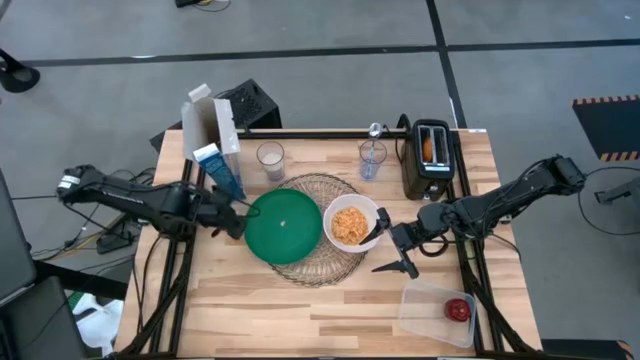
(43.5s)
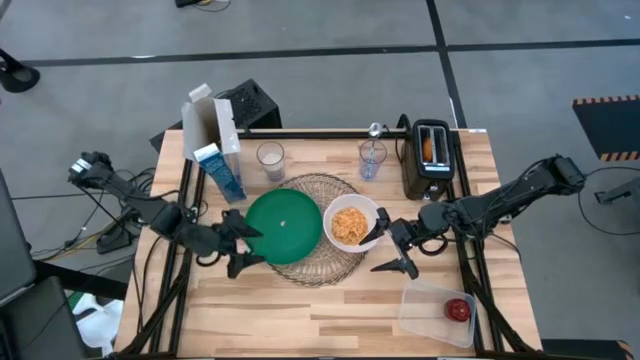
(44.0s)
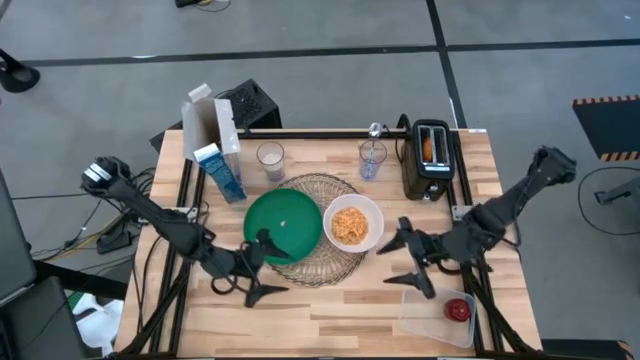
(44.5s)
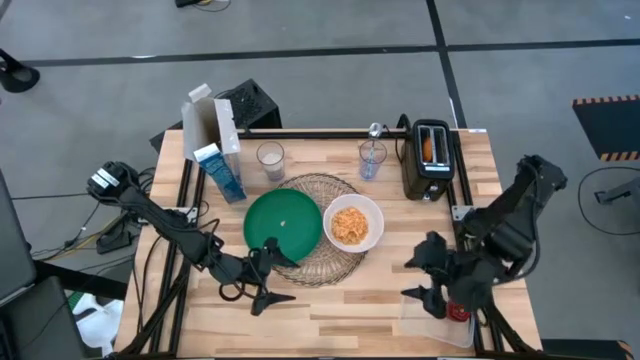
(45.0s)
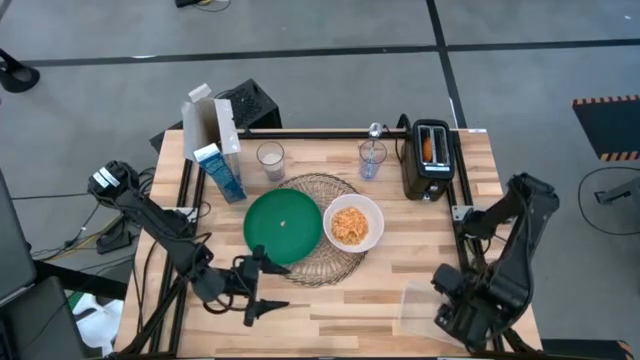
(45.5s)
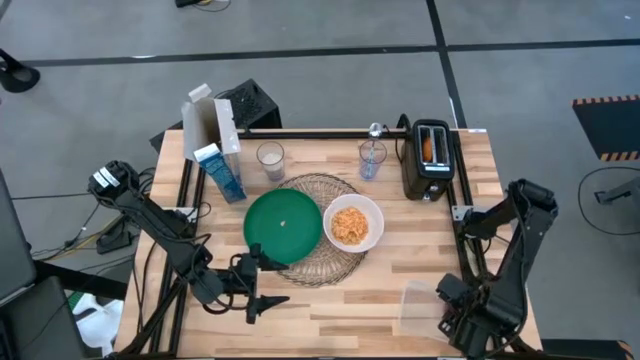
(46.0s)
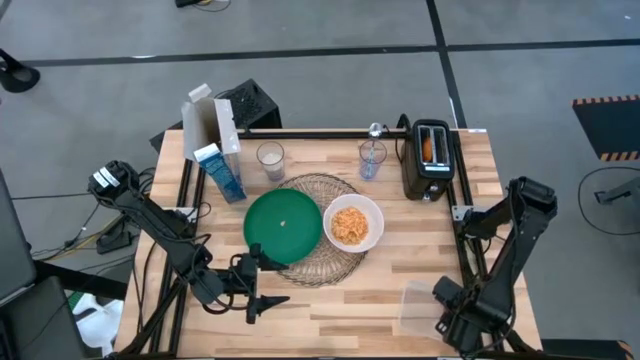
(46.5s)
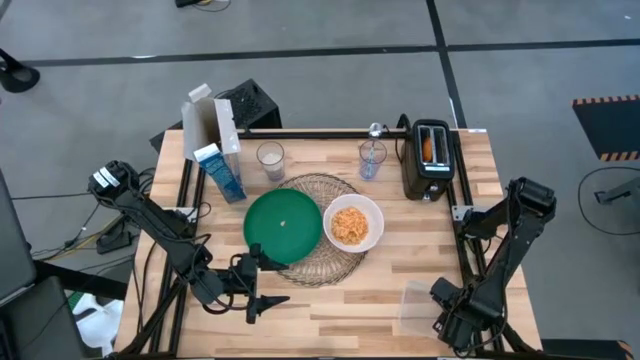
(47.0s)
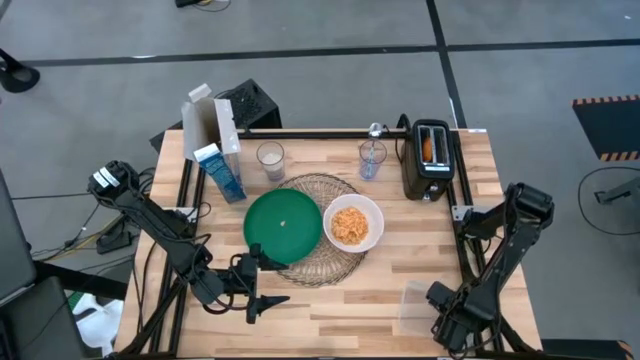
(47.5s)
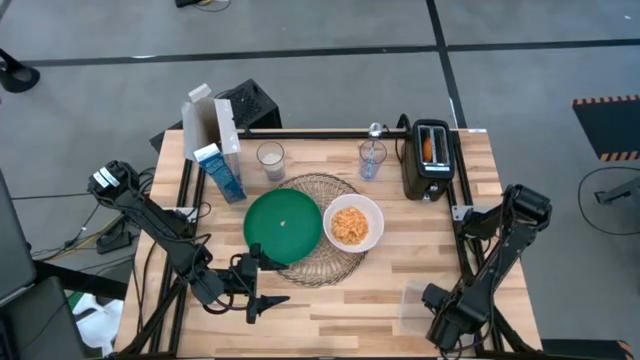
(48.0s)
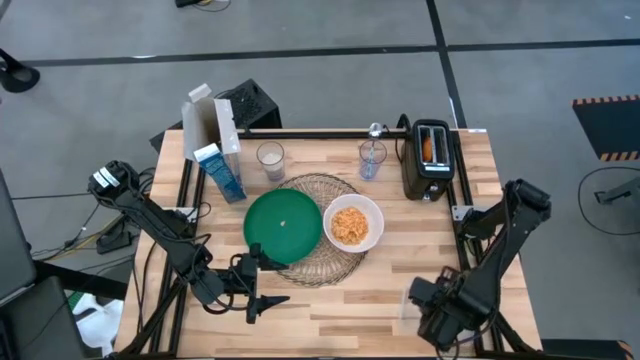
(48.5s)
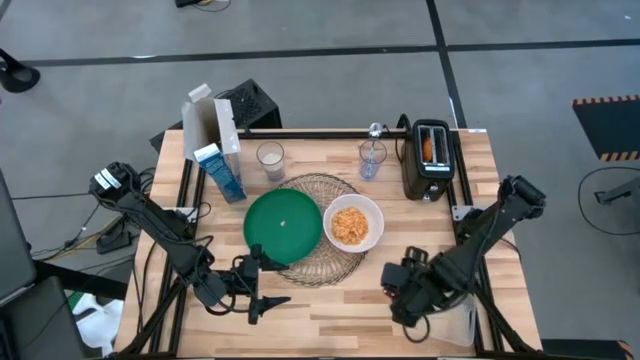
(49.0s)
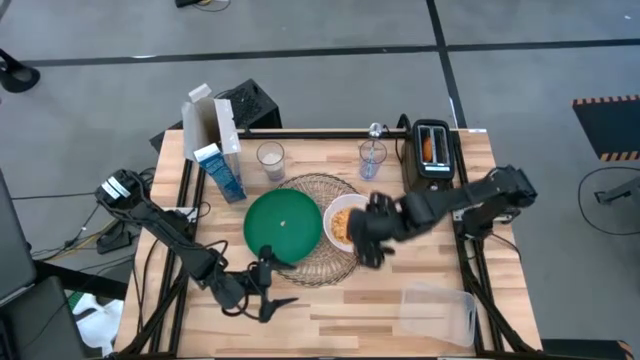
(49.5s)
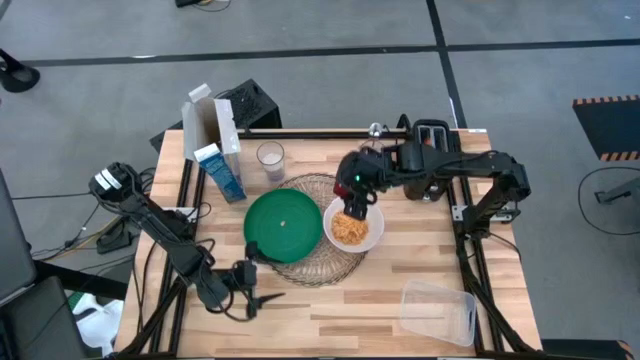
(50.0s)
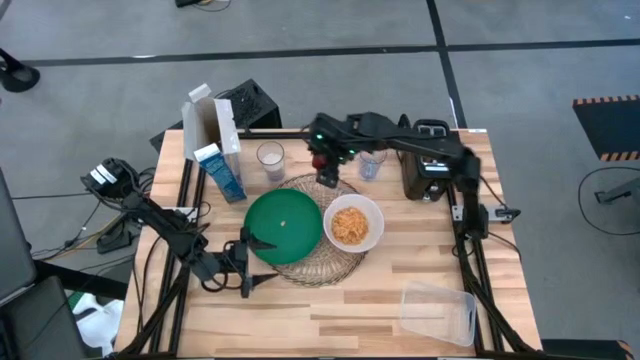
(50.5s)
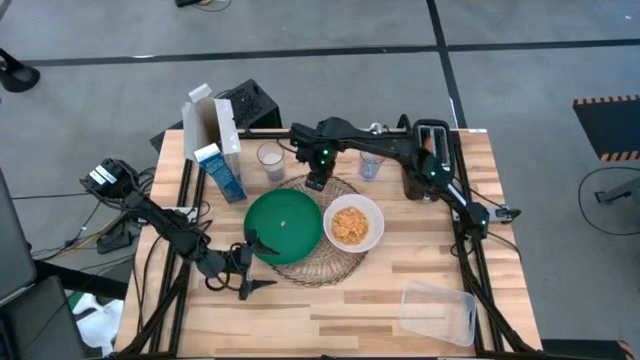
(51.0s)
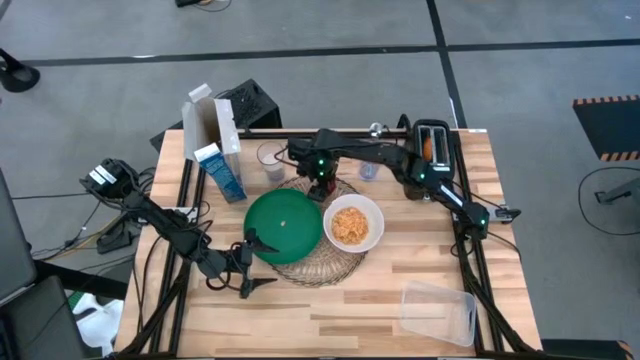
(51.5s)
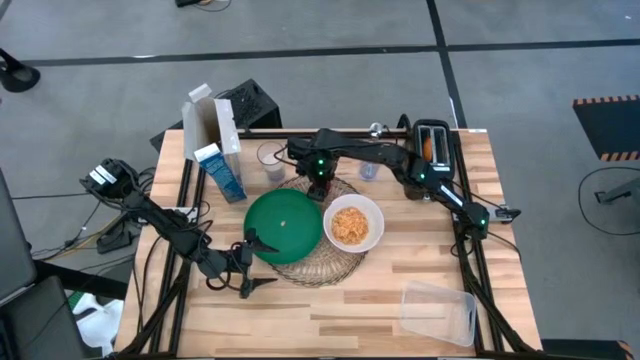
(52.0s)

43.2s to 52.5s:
Task: Arrange a breakfast setting
Put the red apple on the placemat above the green plate and white bowl from the bin

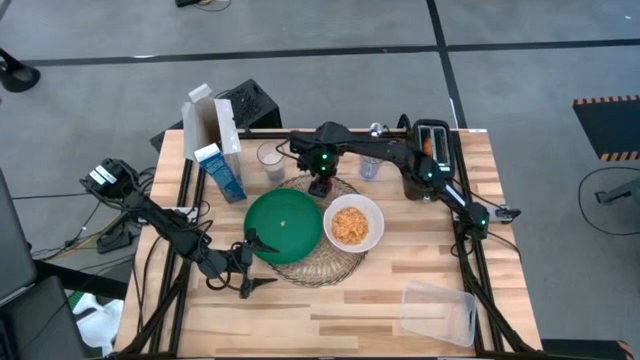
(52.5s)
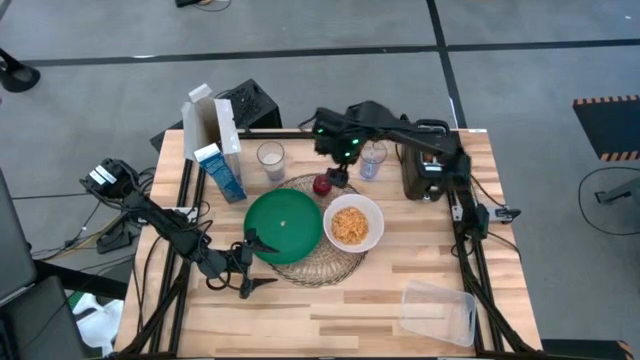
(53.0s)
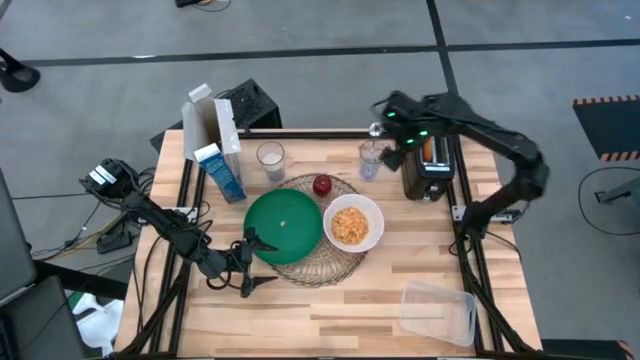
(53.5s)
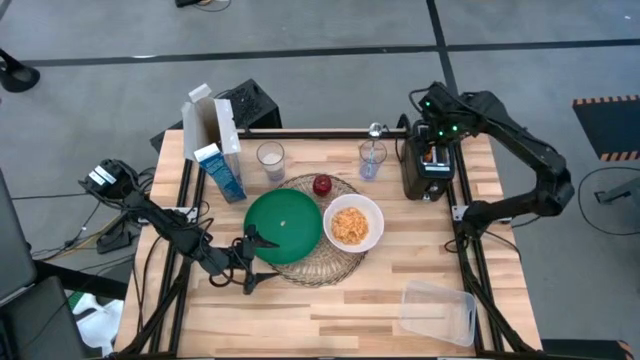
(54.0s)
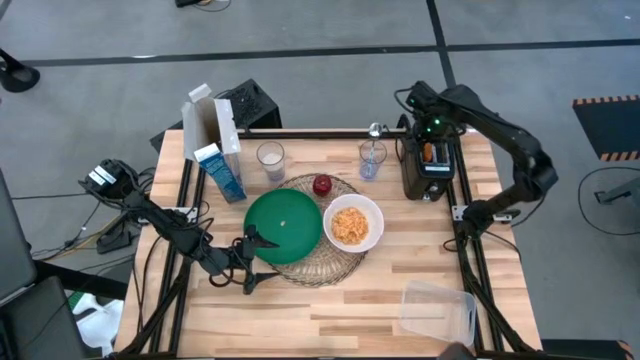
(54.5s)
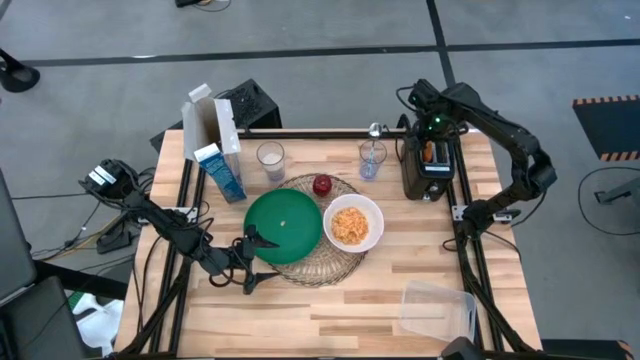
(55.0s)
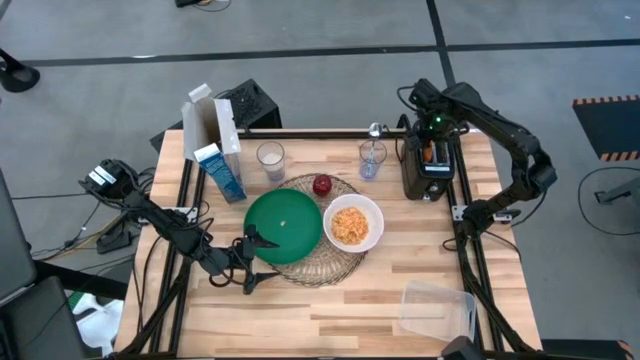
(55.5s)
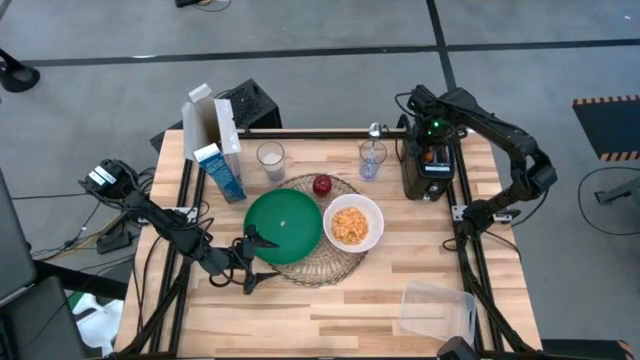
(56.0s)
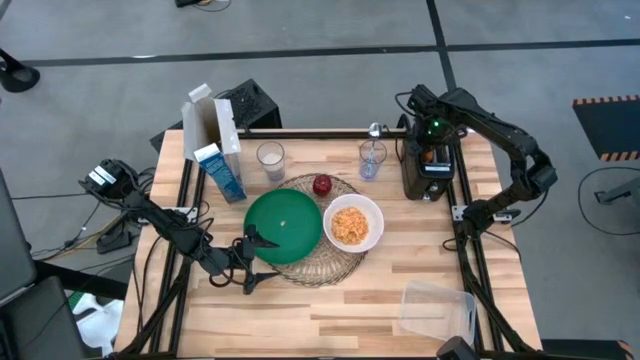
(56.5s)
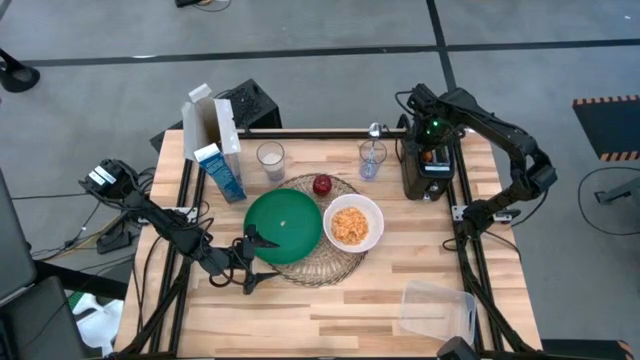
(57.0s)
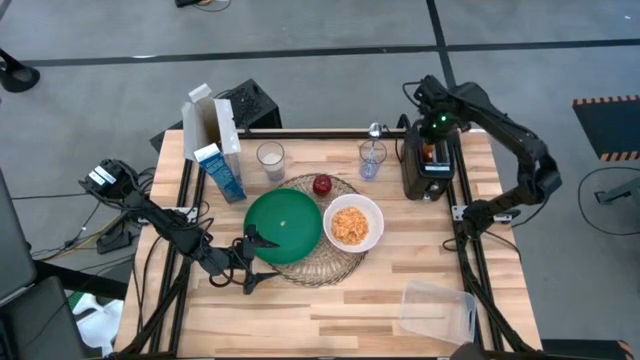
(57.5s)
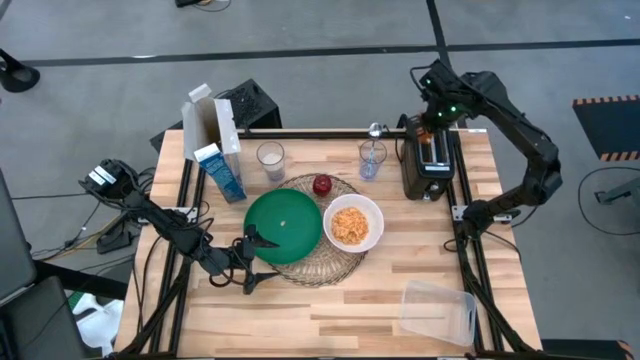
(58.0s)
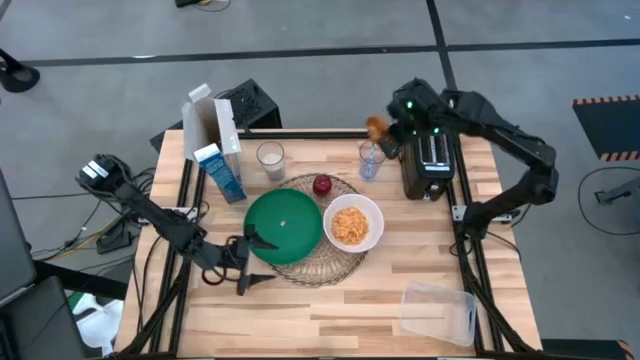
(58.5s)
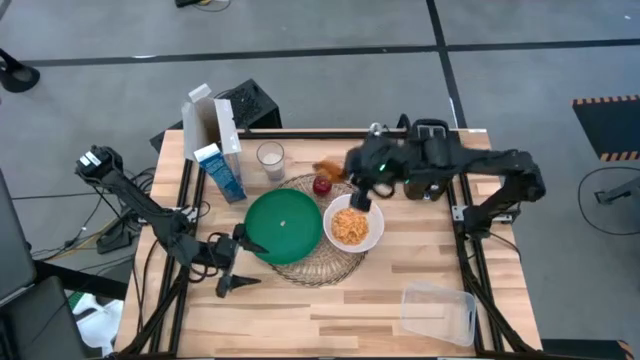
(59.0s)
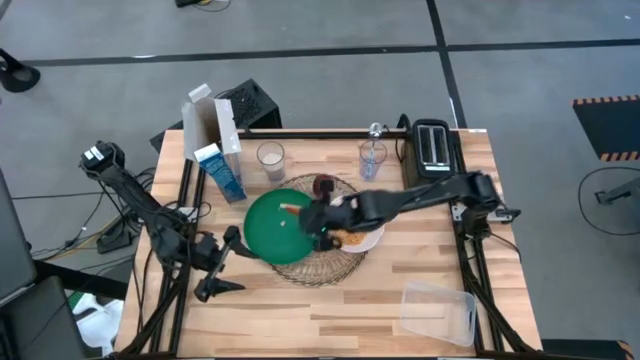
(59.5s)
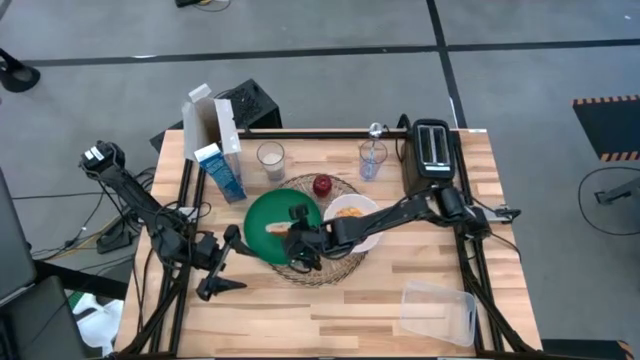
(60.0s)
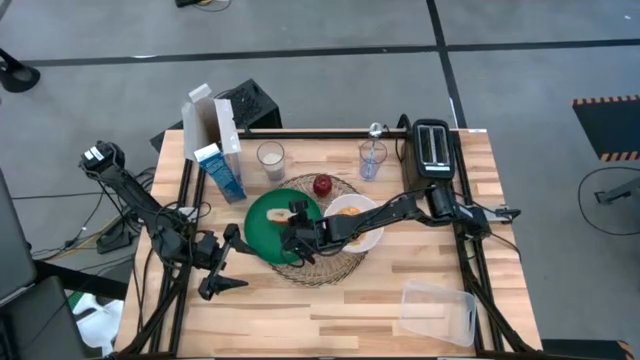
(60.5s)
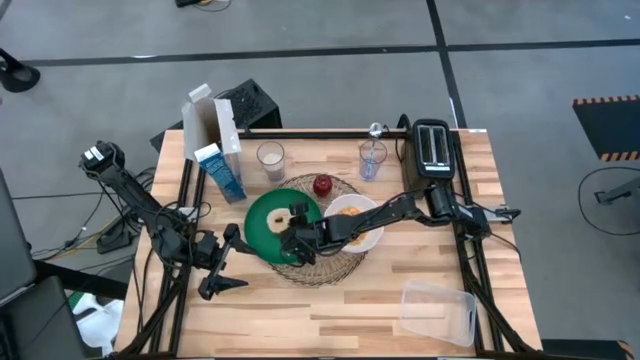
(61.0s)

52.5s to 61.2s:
Put the toasted bagel on the green plate from the toaster

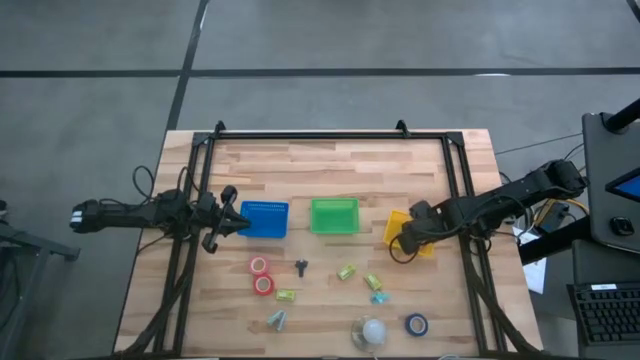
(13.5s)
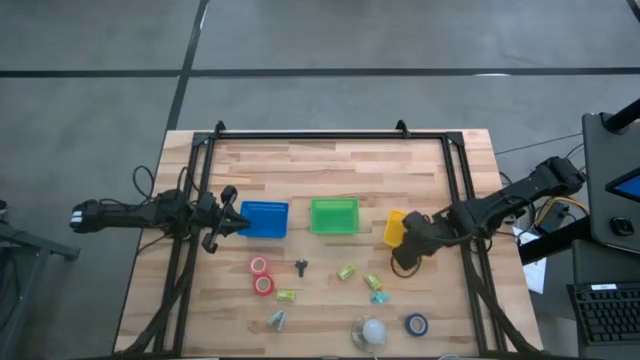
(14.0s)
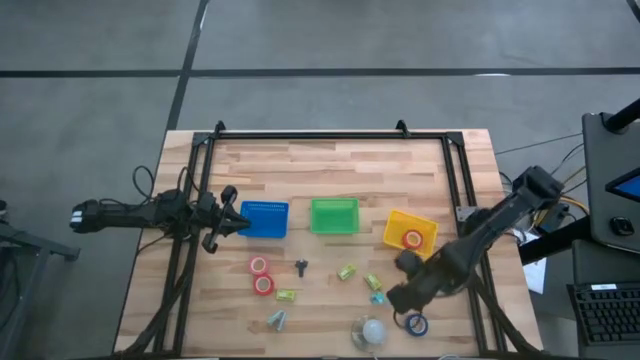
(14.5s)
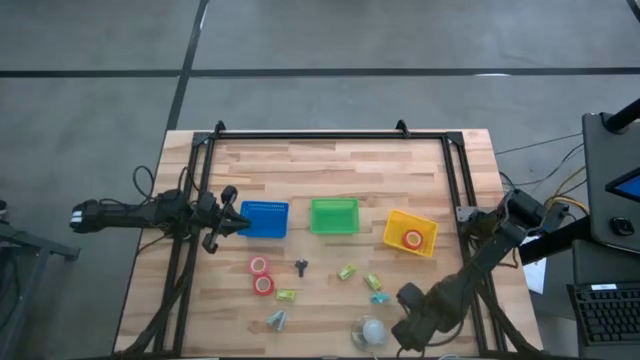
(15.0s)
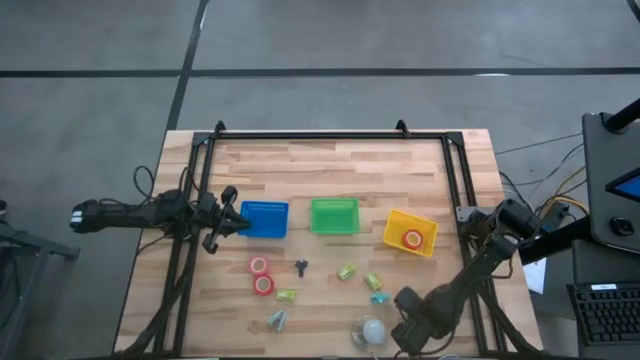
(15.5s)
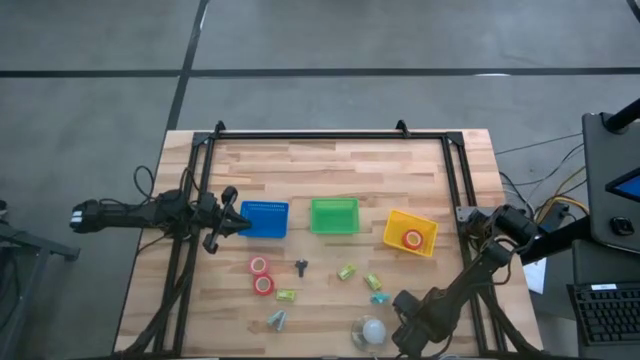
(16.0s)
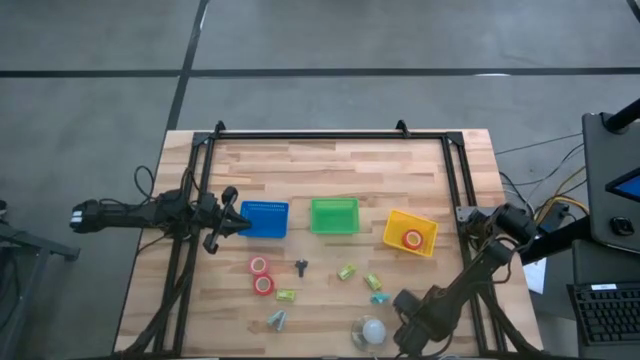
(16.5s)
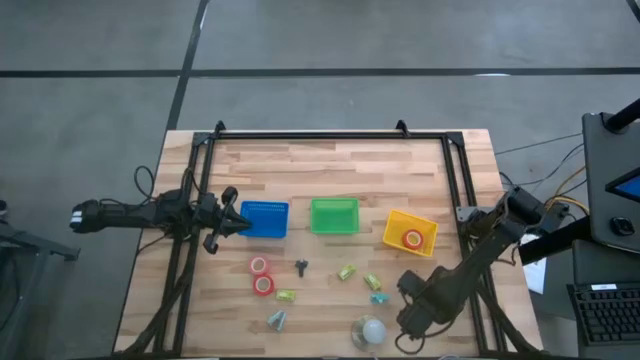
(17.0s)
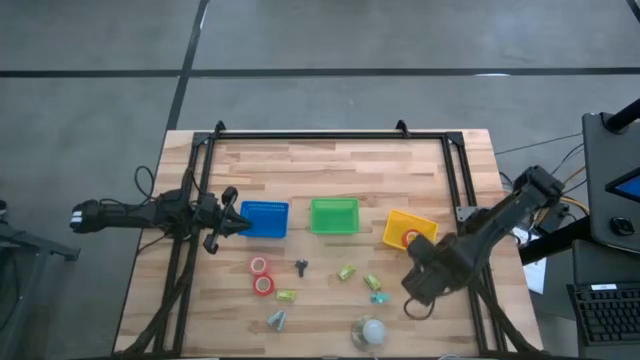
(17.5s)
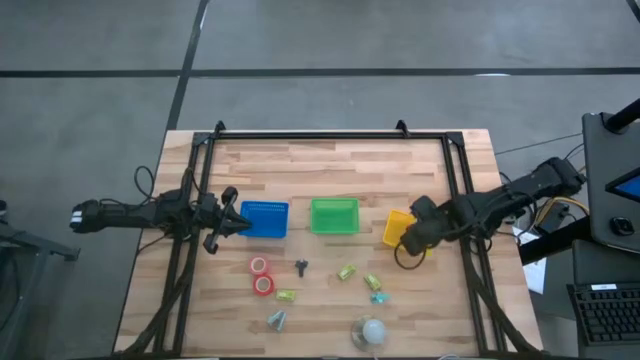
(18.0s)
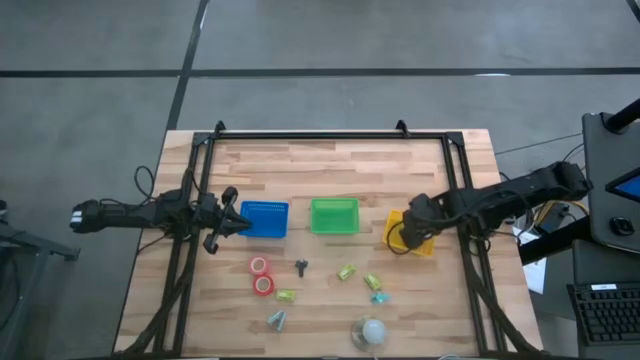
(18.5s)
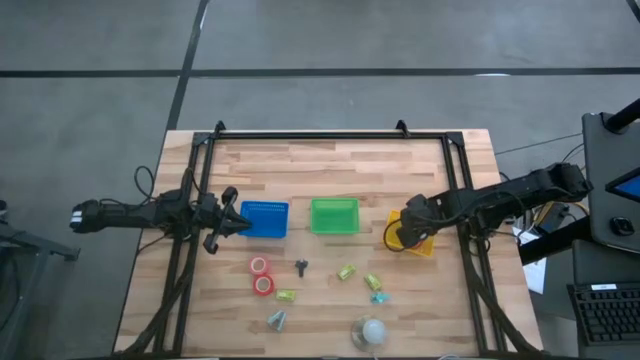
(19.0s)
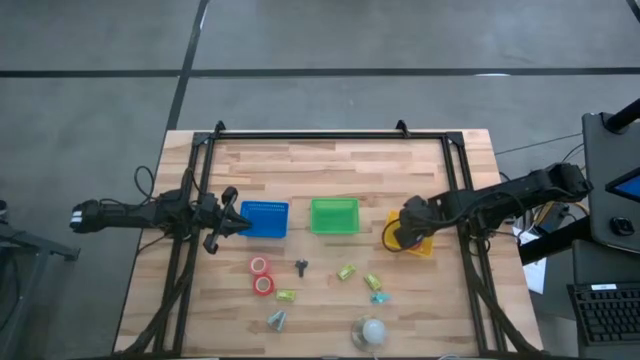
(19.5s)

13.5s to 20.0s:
Task: Pick and place Stapler, Stapler remover, tape
Put the blue tape into the yellow bin
